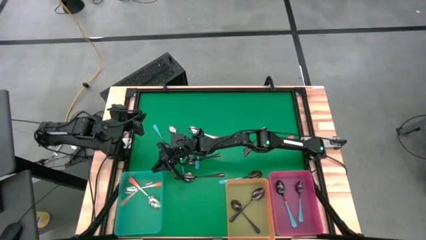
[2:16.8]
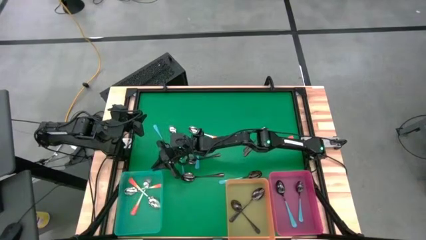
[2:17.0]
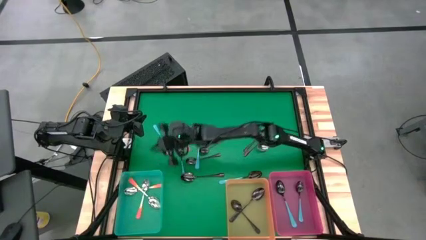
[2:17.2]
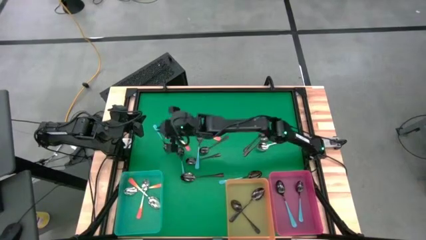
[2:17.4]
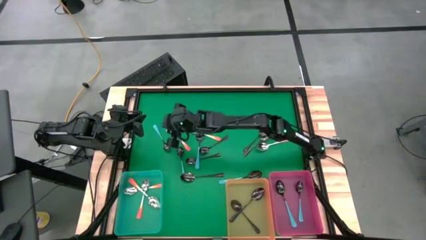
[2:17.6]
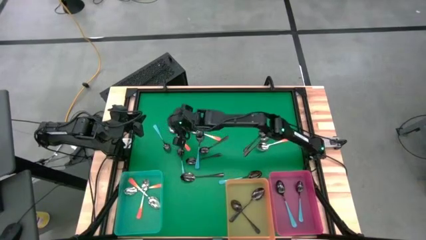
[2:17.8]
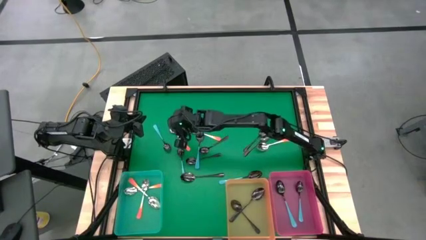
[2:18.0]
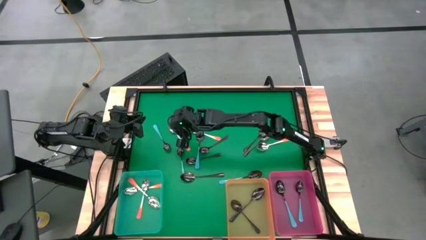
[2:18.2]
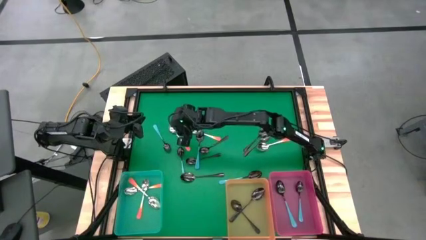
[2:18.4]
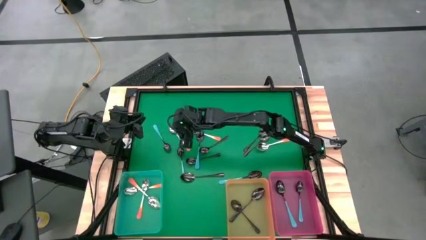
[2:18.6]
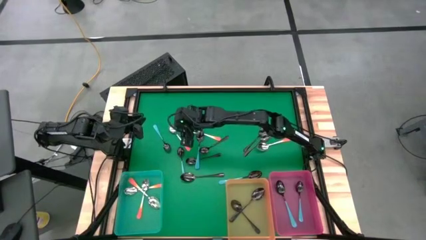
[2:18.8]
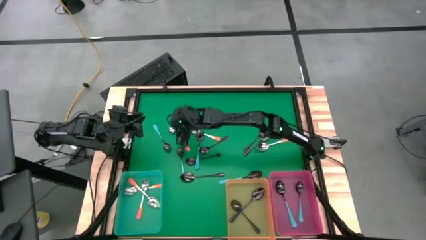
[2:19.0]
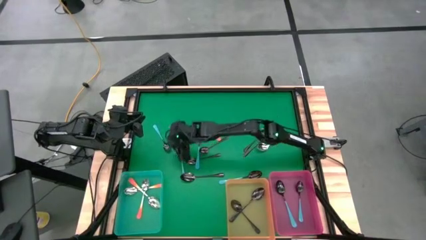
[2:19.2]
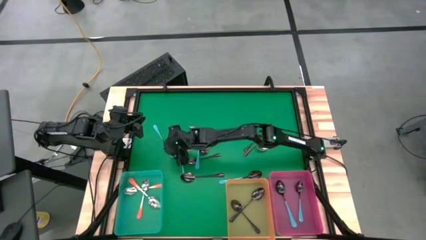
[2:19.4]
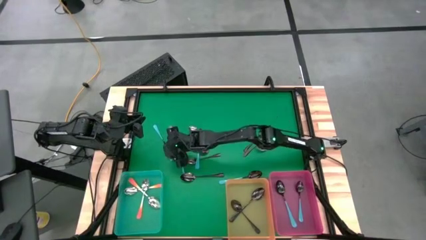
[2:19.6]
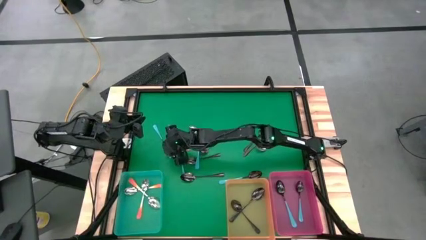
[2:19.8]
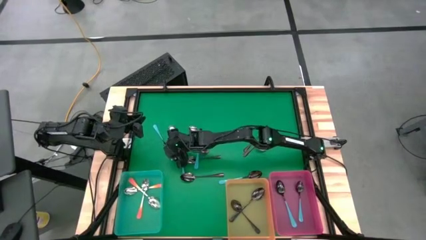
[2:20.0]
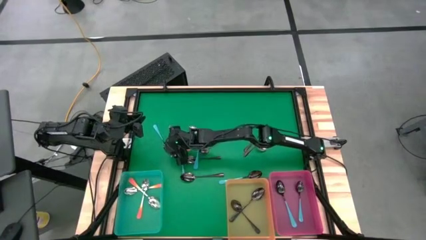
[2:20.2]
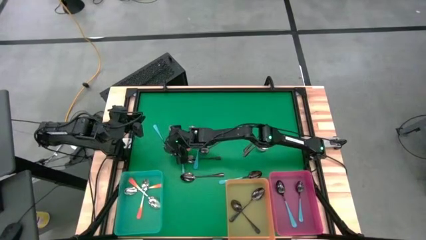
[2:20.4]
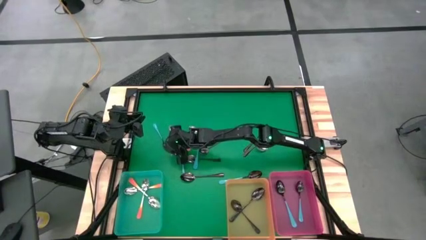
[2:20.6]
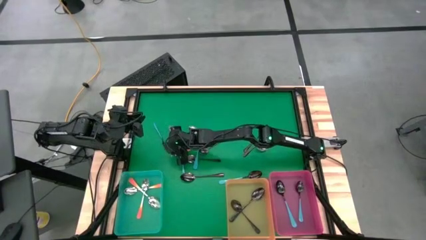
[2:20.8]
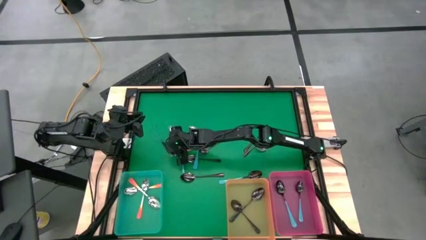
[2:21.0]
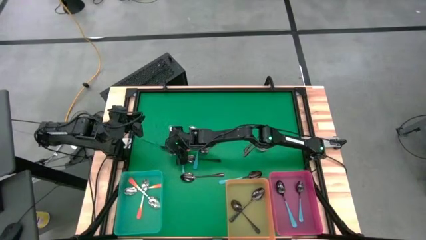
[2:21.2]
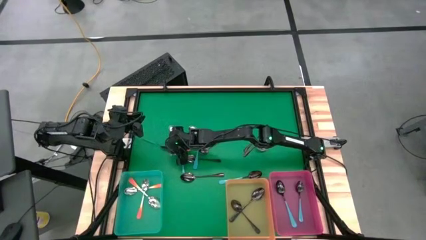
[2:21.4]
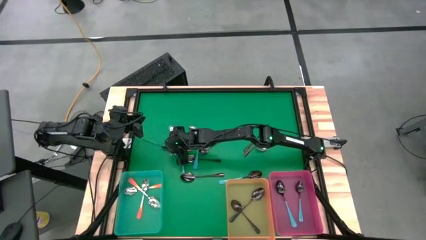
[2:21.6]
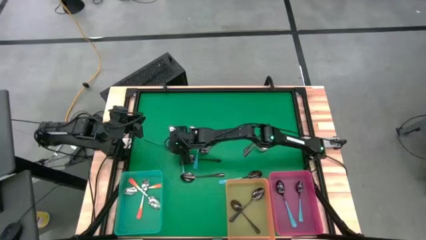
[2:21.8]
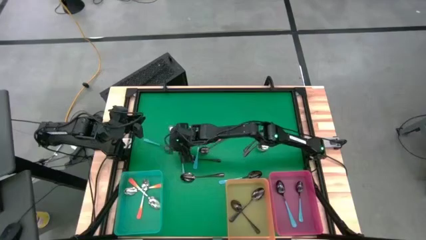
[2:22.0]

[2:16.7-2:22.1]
Task: Sort silverware by color (type)
Put the blue spoon into the pink bin

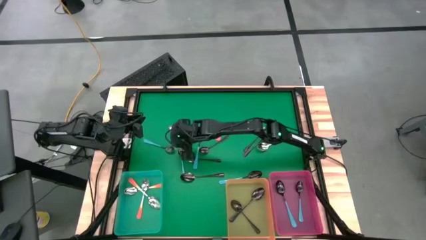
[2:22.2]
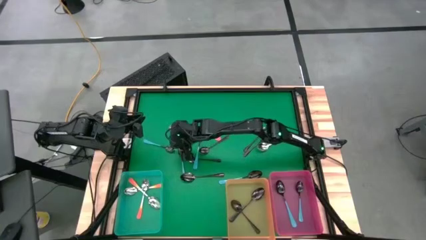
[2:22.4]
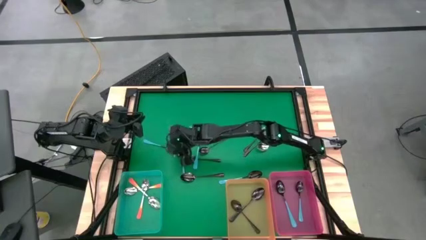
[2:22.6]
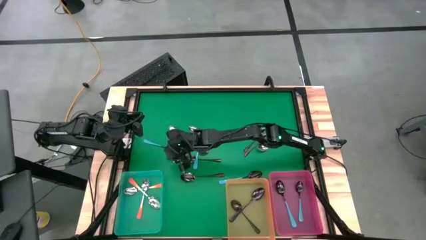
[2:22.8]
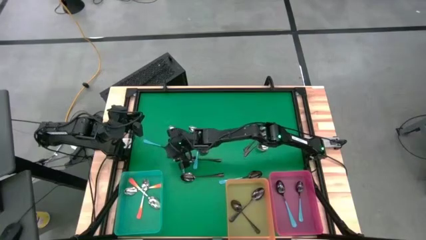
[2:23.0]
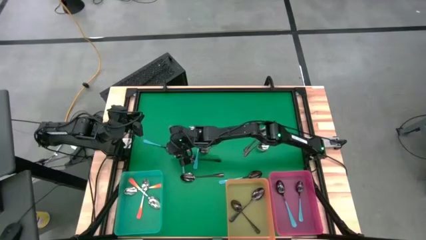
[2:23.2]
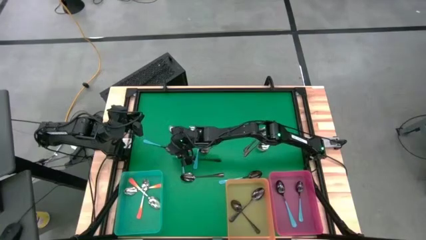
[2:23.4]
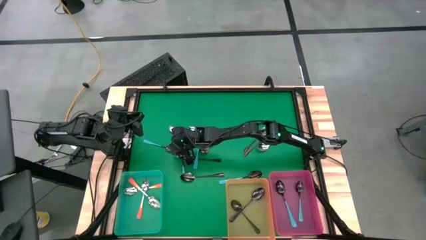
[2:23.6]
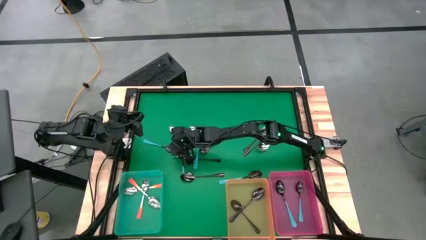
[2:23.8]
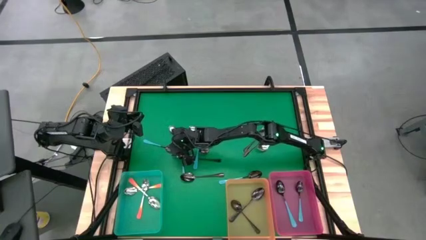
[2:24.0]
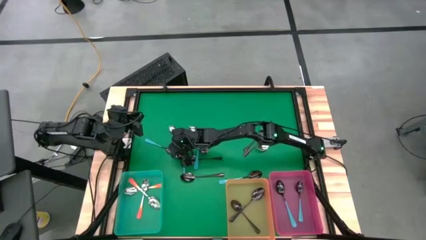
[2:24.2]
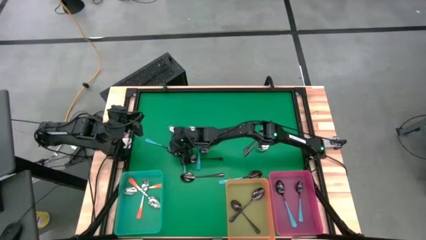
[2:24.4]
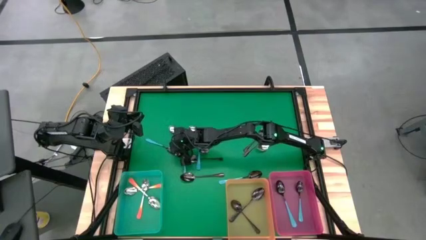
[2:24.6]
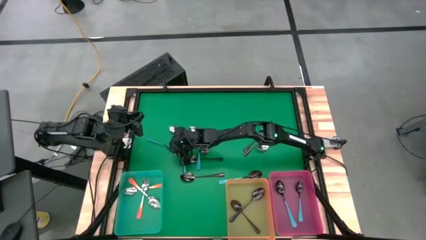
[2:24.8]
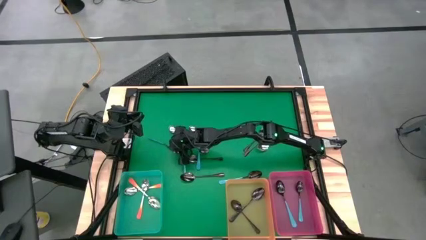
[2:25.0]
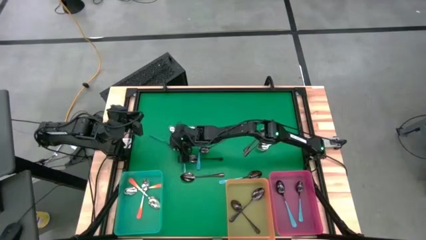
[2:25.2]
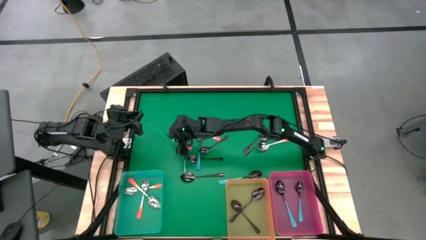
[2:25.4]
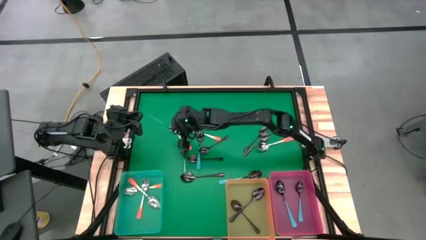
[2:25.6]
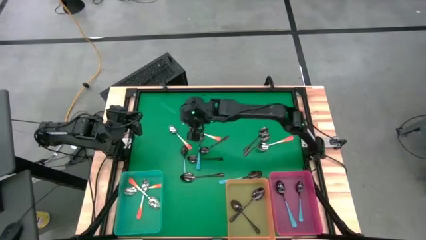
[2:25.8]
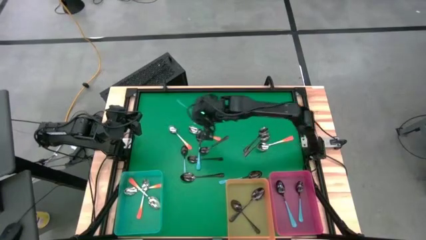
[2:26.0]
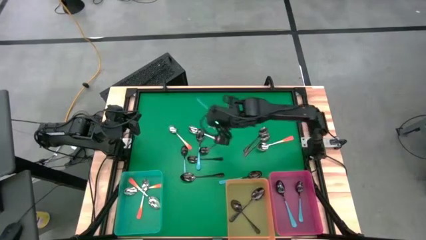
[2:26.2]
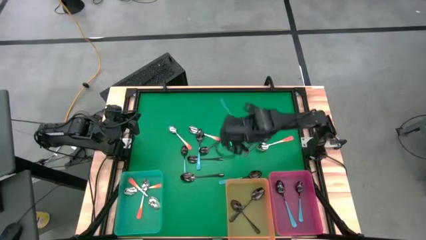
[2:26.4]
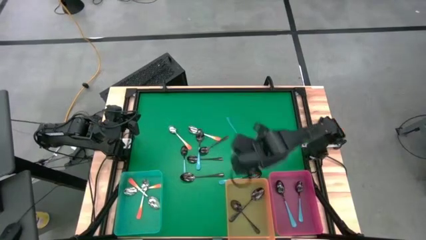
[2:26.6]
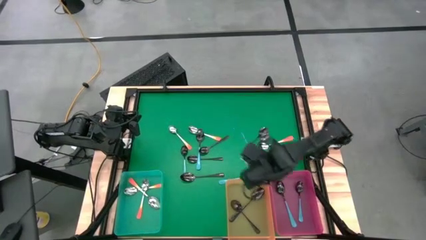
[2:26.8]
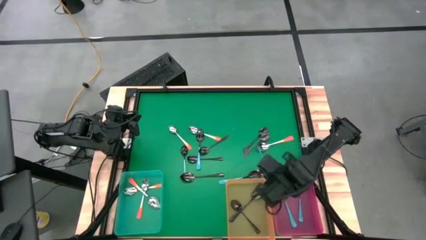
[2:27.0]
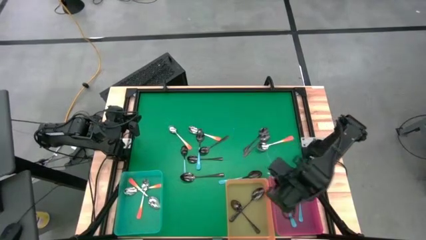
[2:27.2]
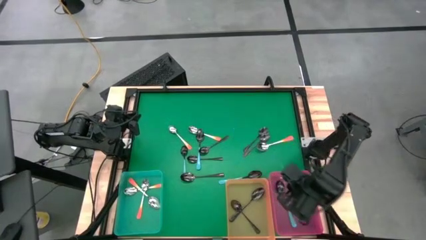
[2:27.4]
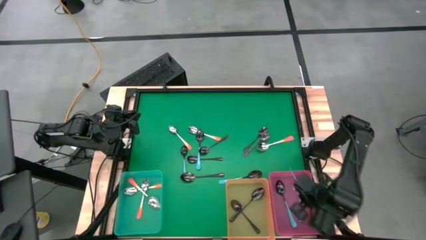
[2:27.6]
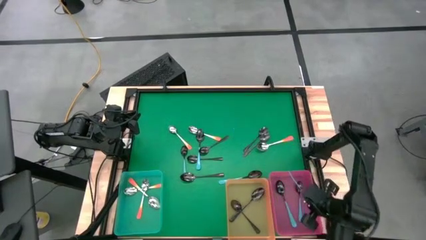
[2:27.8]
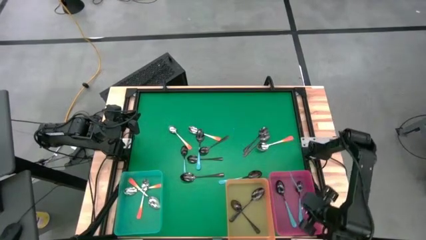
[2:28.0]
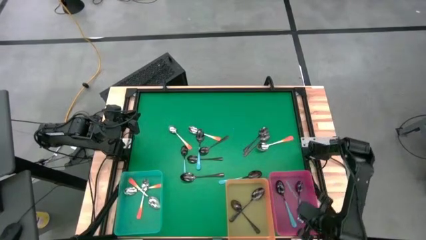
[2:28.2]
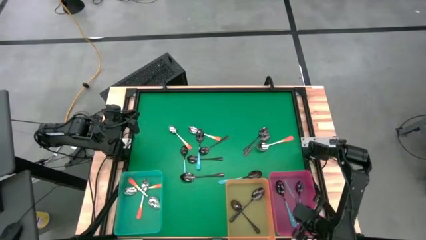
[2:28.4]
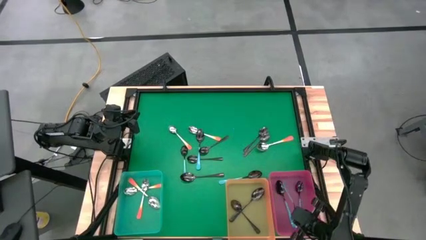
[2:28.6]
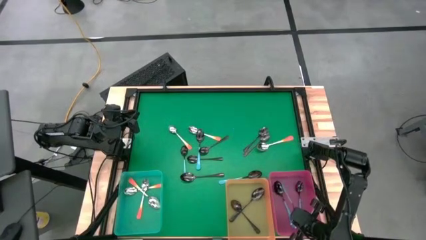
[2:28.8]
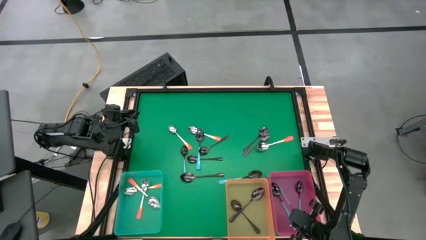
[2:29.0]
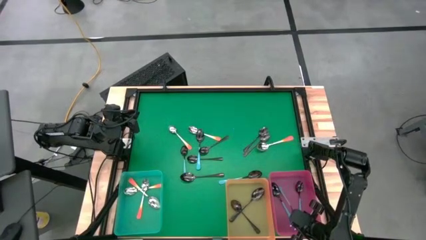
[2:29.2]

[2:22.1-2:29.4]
Put the blue spoon into the pink bin

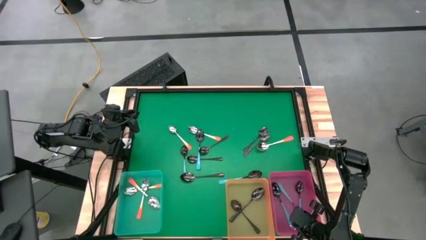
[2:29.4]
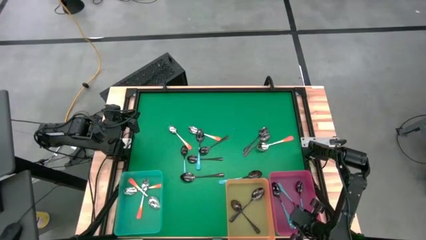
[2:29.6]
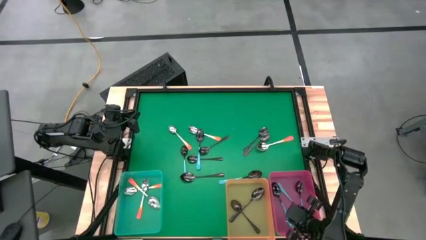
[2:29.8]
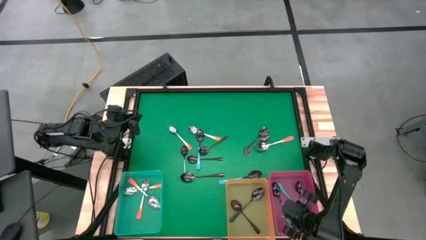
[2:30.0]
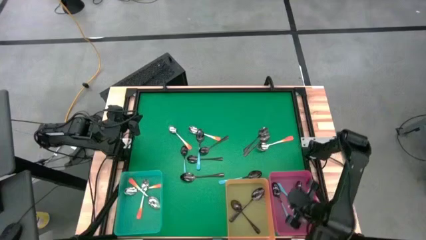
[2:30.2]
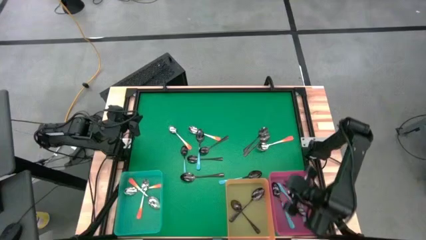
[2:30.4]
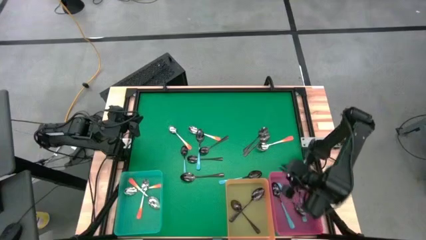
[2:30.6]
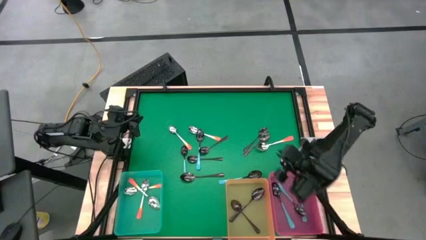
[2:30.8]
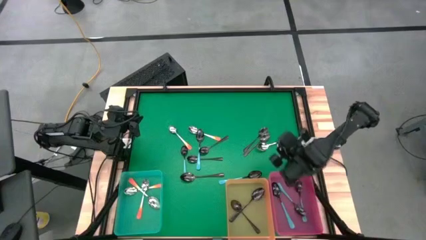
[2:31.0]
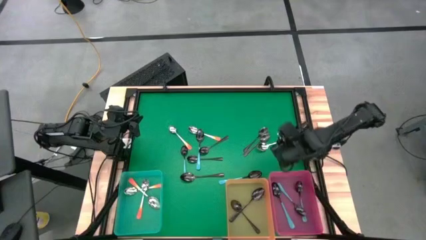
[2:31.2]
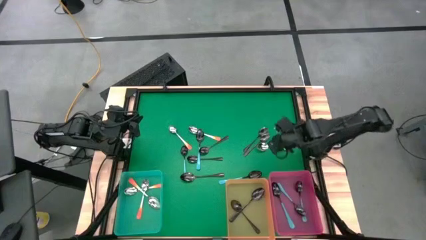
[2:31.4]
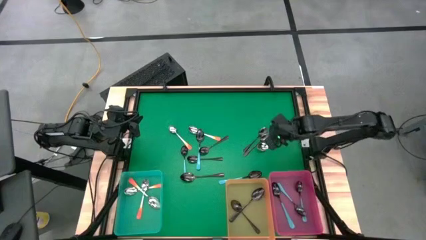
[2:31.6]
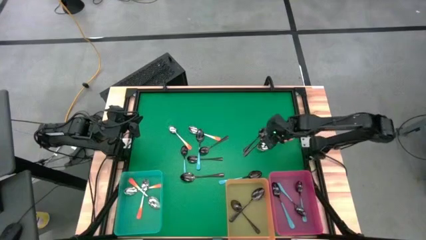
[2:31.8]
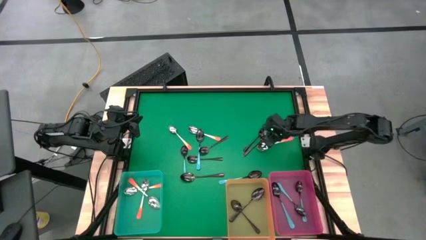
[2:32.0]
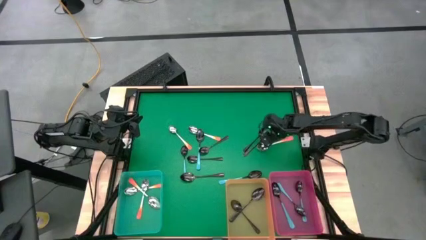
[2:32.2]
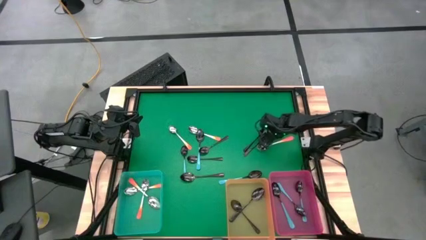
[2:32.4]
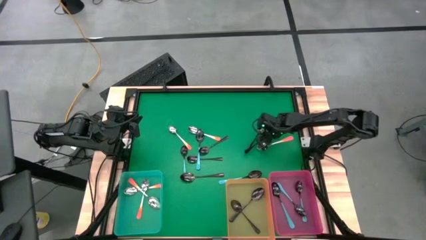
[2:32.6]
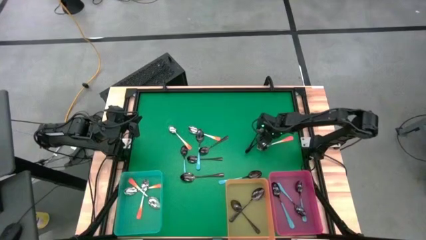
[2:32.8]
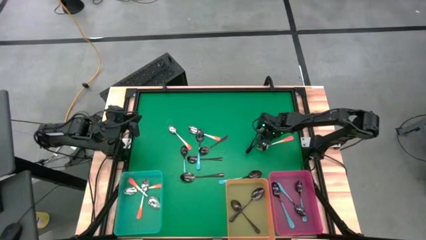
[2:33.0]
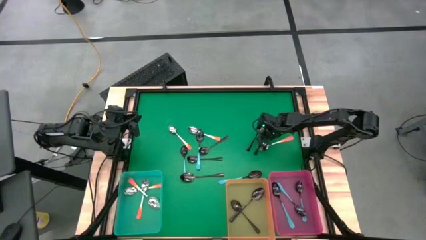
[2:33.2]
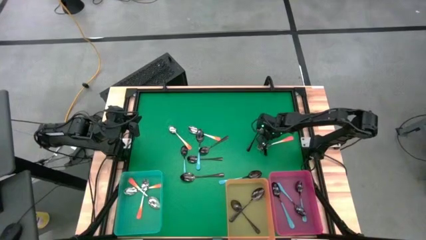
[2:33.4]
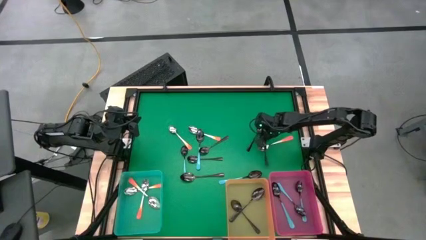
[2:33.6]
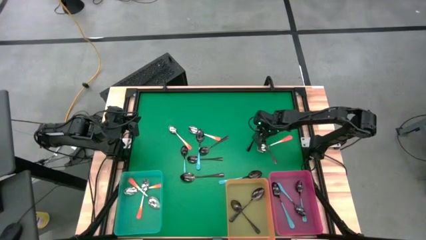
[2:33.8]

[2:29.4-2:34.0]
Put the black spoon into the orange bin
